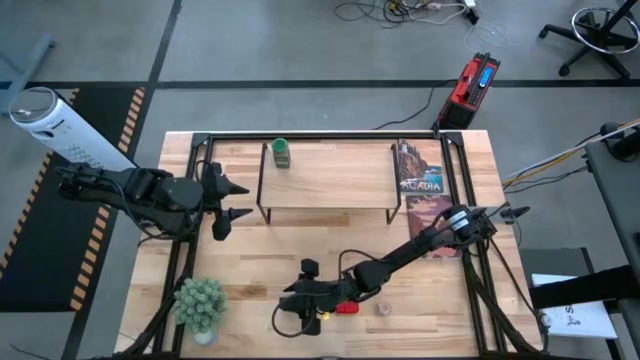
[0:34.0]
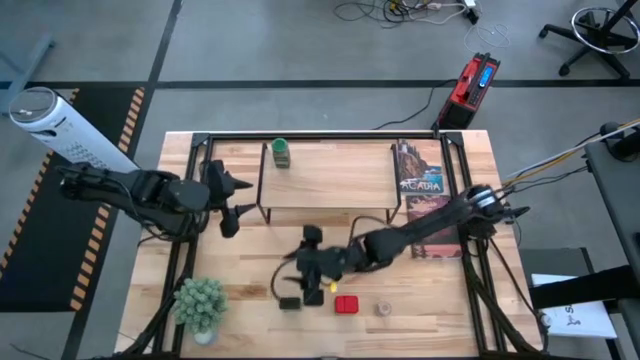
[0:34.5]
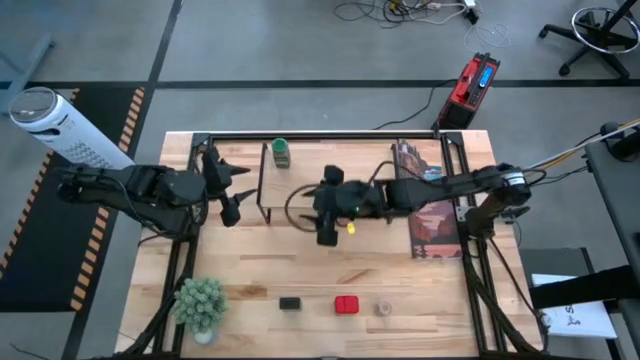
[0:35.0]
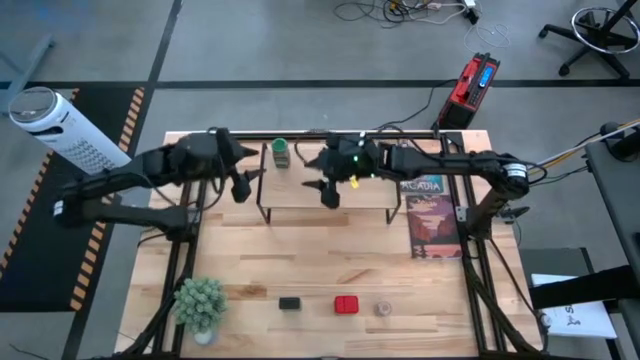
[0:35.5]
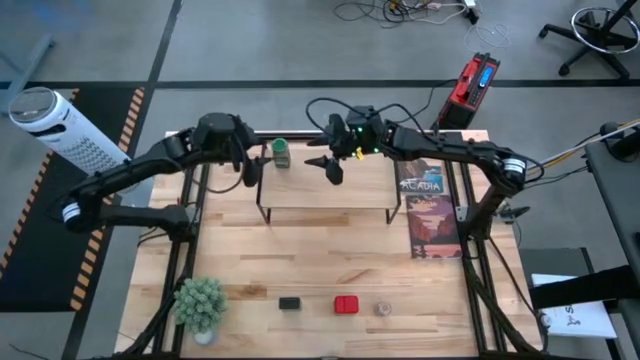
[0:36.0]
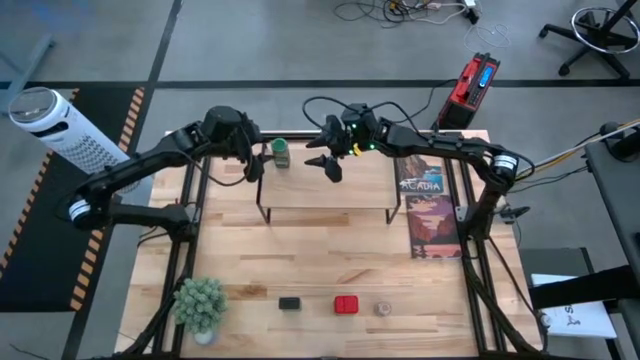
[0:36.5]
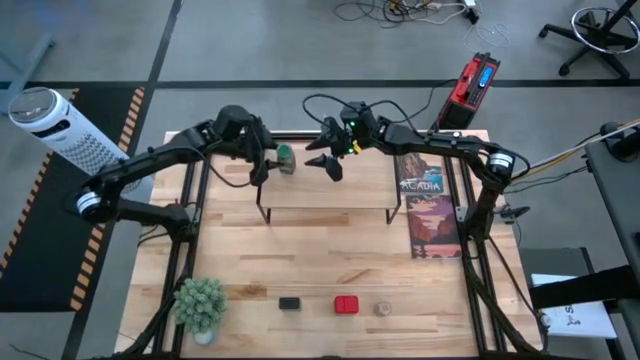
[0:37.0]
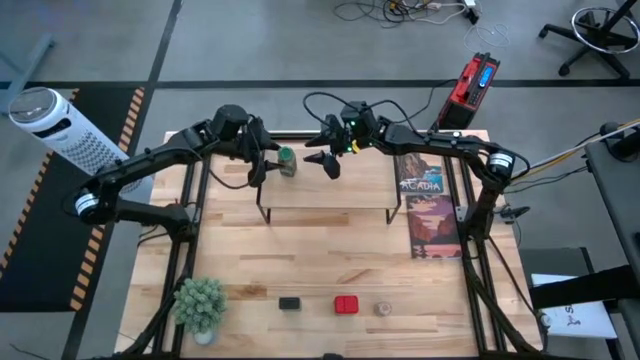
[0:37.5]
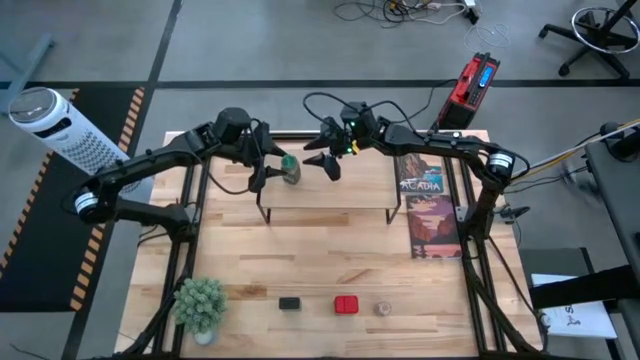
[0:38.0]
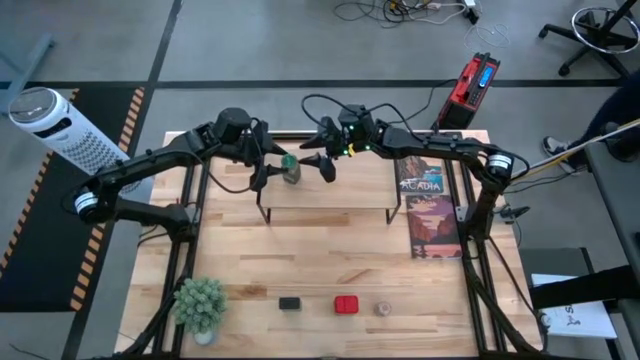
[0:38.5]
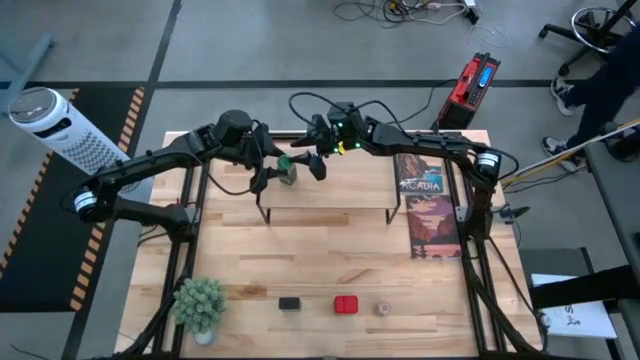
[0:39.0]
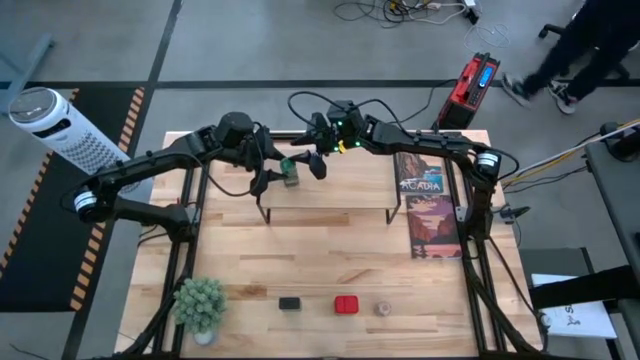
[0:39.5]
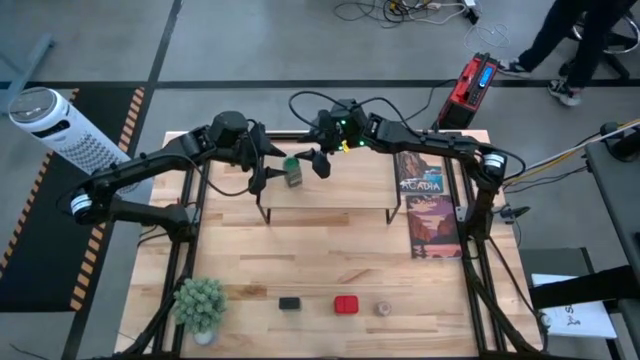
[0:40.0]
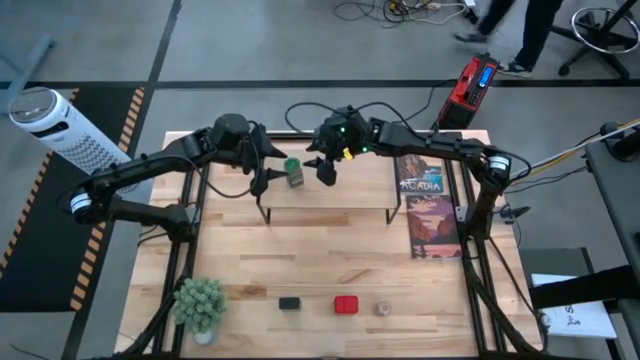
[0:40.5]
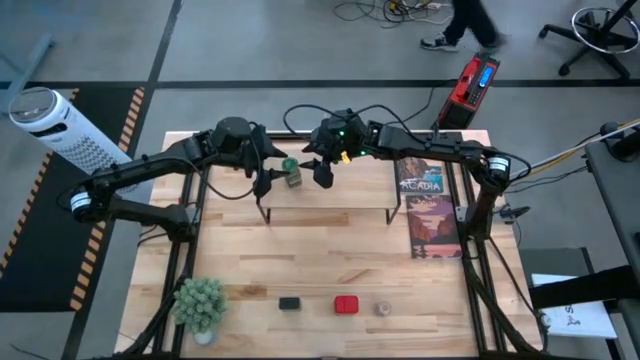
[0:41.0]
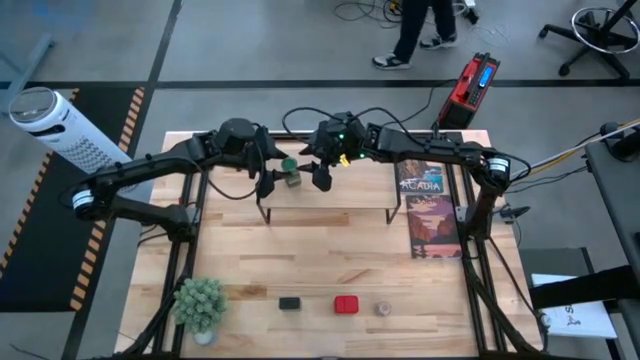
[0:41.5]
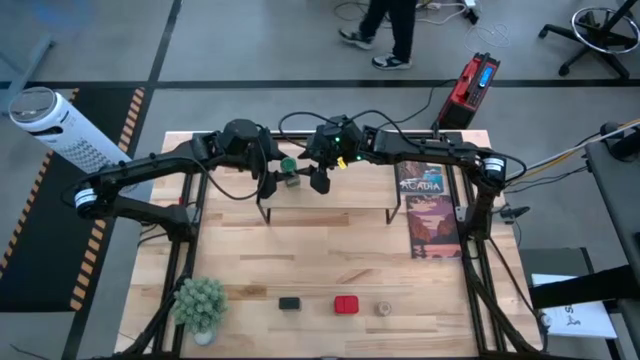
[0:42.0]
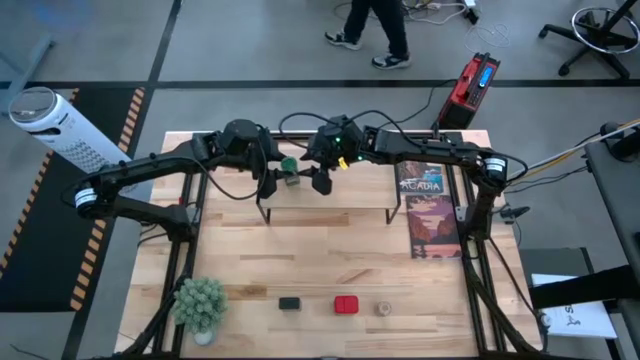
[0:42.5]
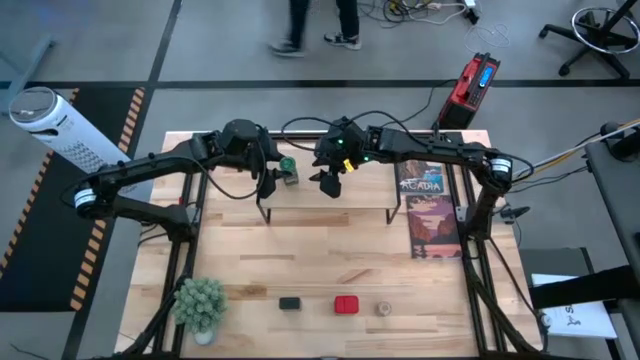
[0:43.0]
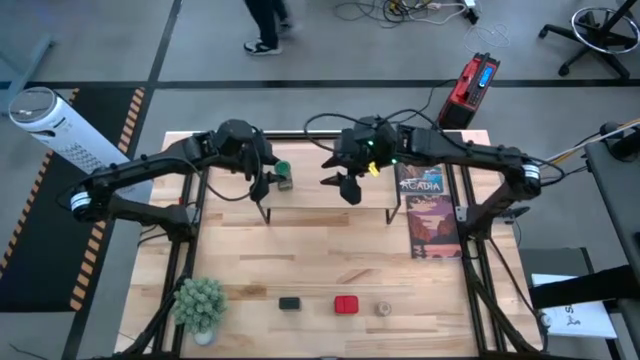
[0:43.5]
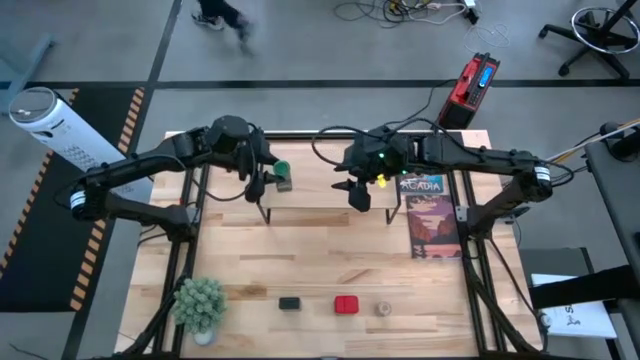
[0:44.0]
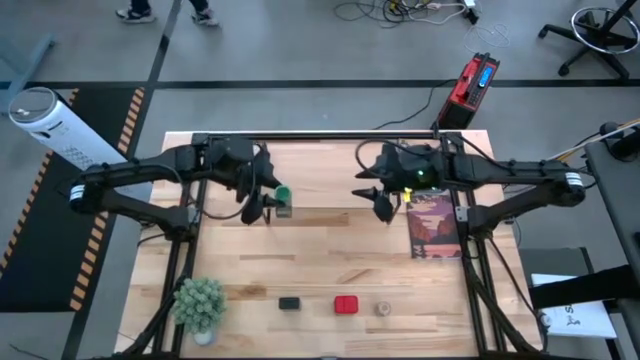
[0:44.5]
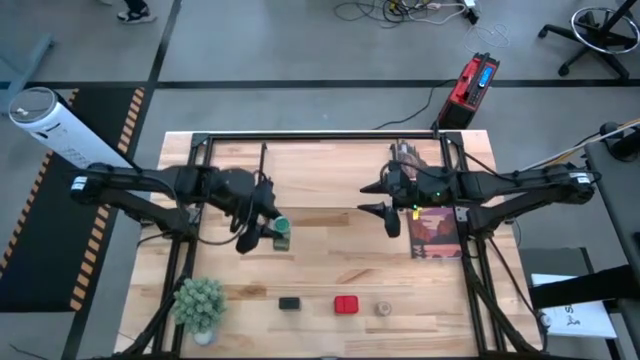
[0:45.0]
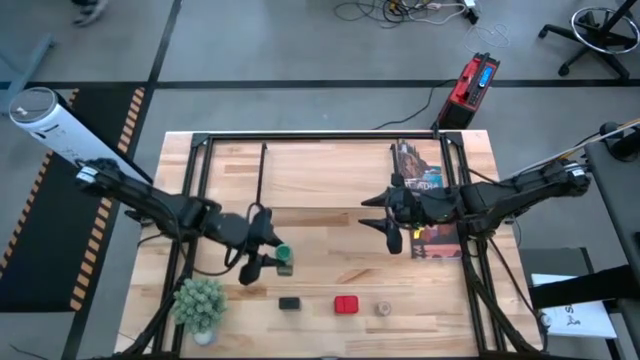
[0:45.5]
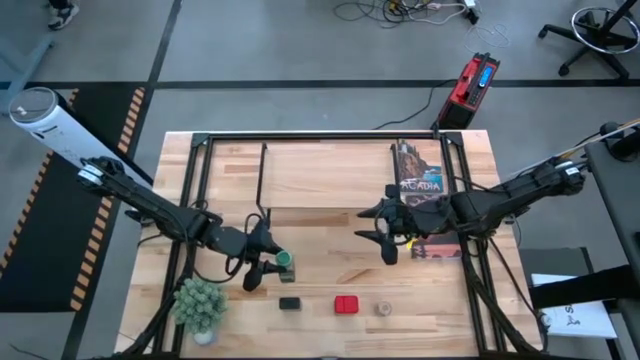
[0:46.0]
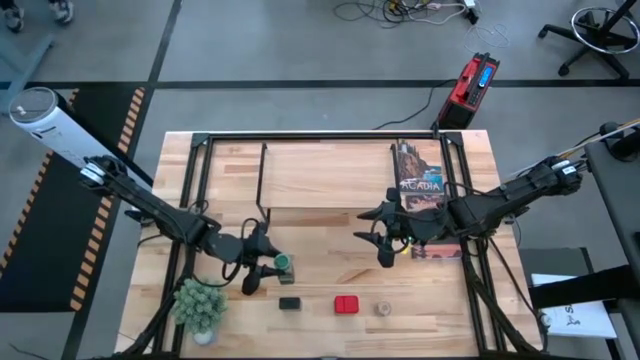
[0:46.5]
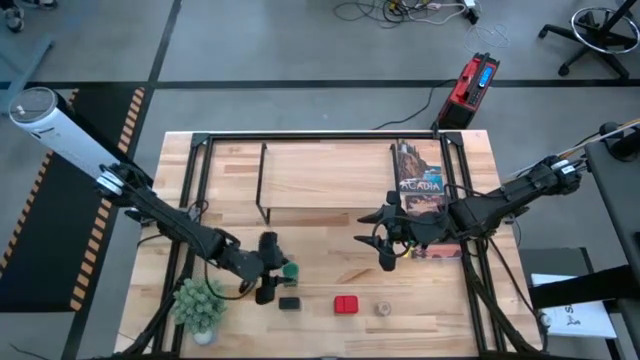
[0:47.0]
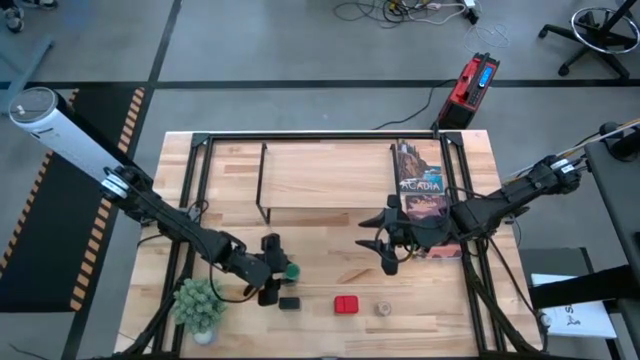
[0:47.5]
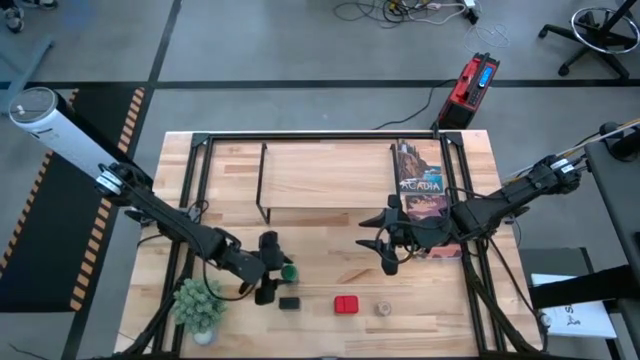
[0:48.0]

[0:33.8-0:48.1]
Task: Shelf spices
Remove the green seasoning bottle from the shelf

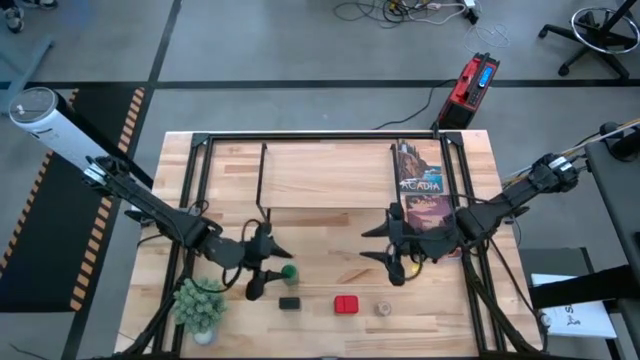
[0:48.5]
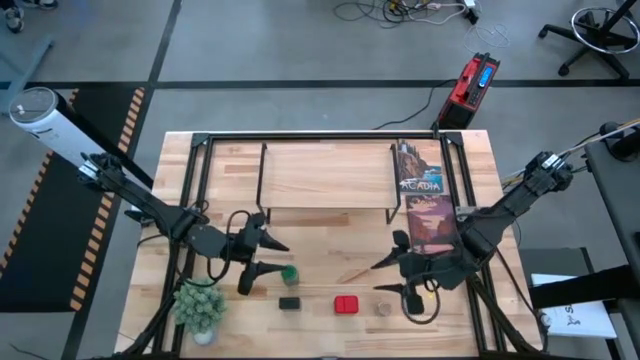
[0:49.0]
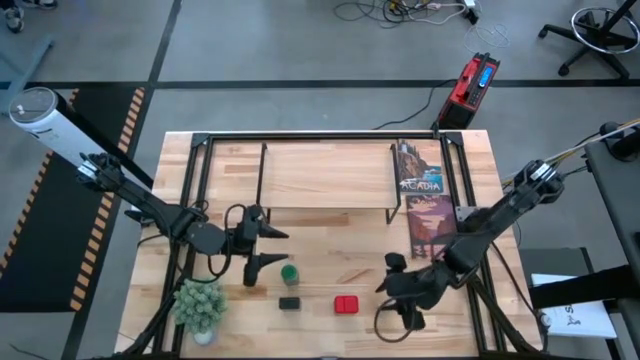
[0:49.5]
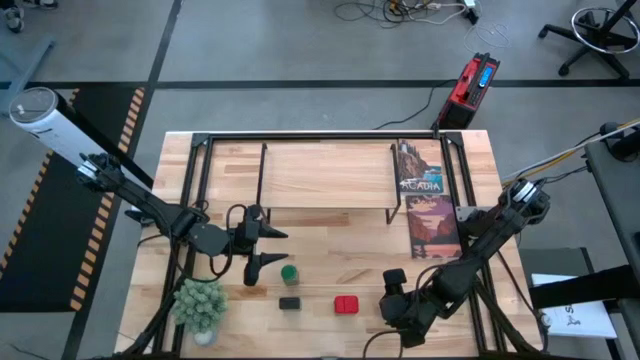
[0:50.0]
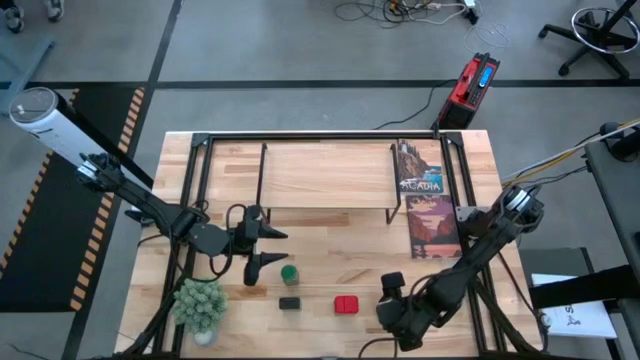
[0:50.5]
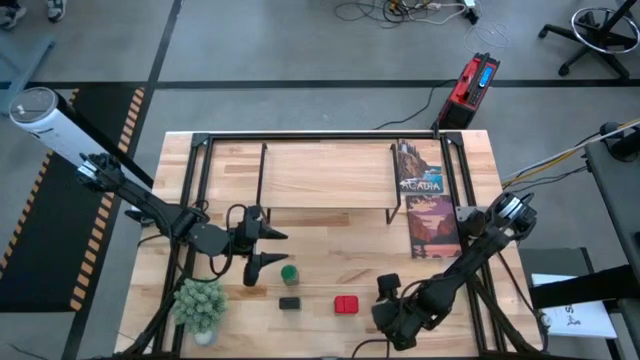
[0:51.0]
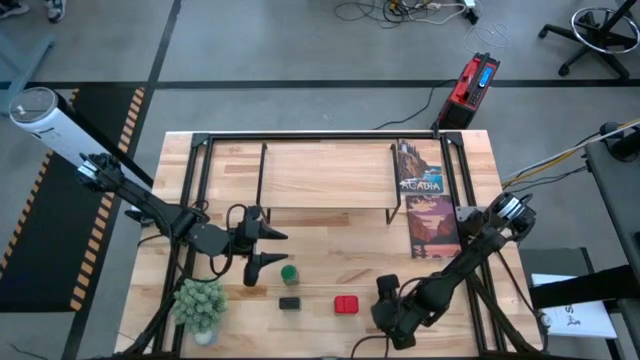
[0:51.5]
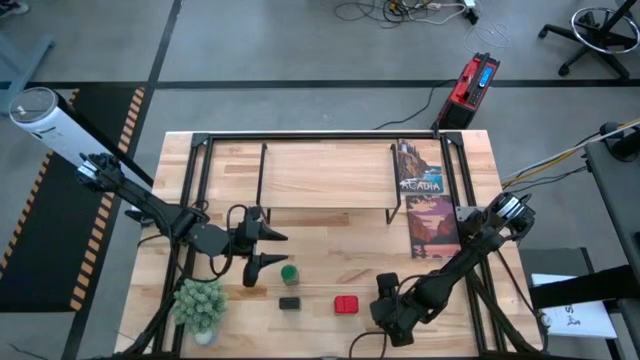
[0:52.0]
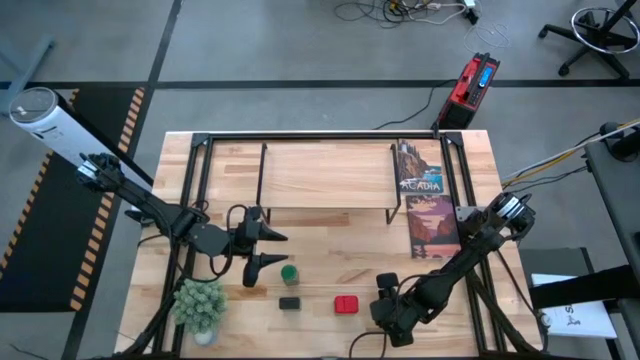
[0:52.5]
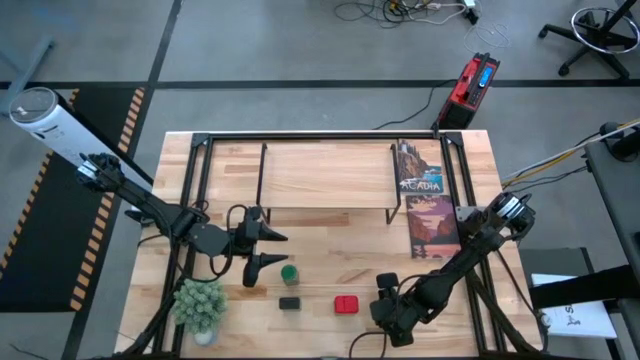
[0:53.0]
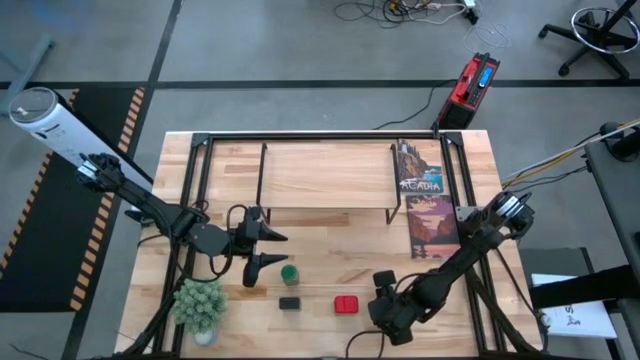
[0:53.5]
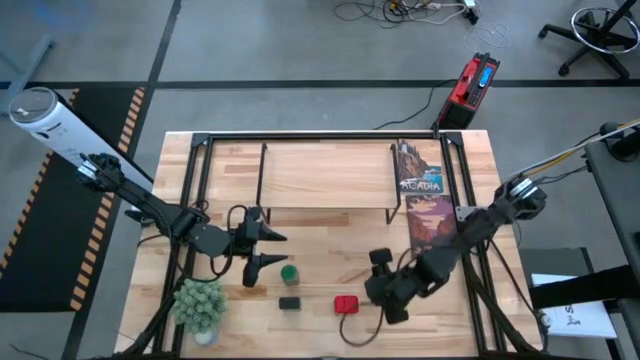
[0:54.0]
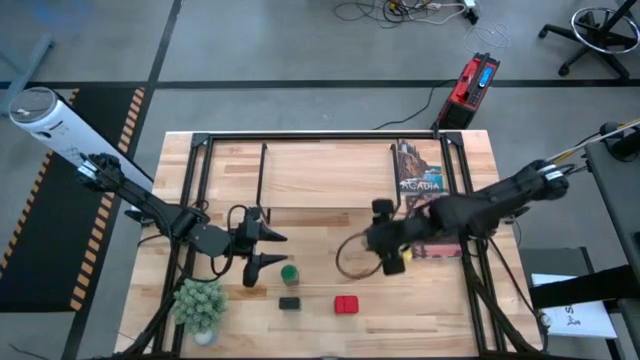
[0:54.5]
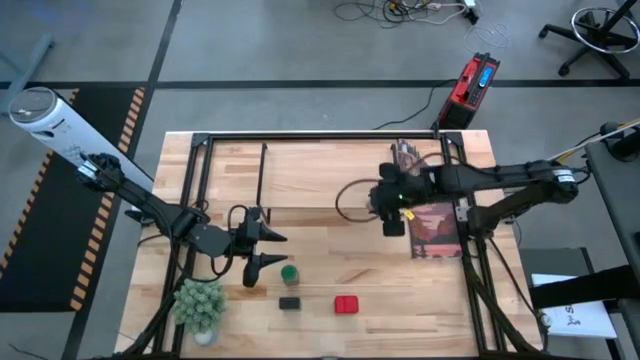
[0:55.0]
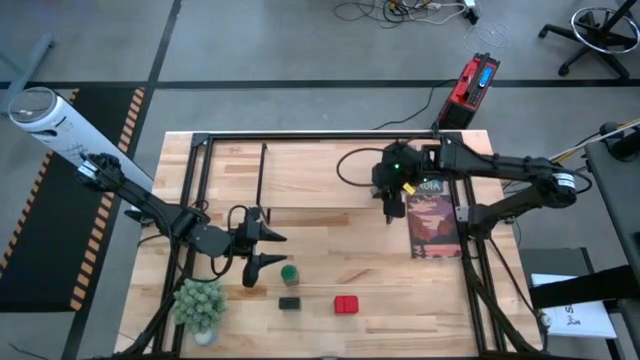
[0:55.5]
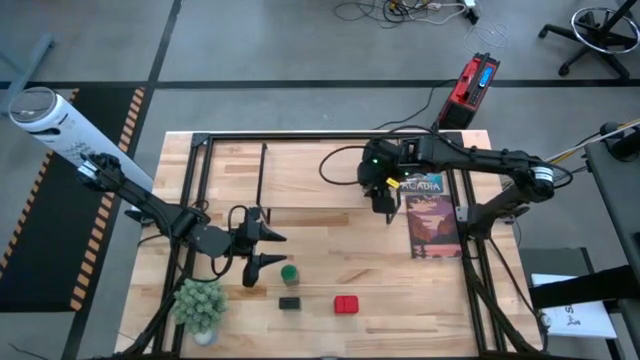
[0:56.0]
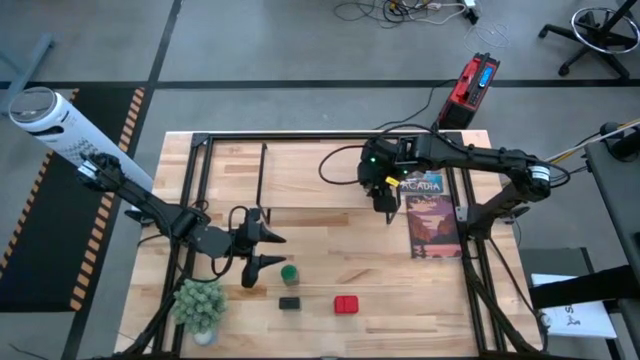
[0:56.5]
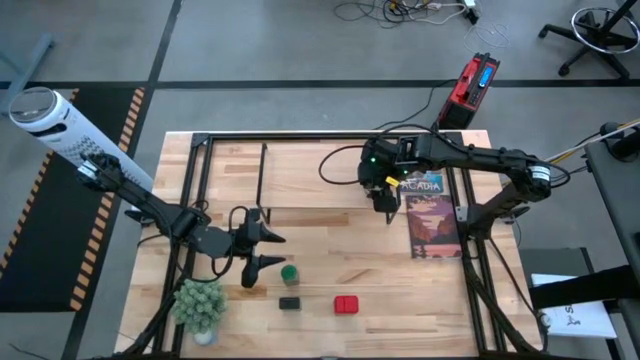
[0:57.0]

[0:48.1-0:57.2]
Put the brown seasoning bottle on the shelf
